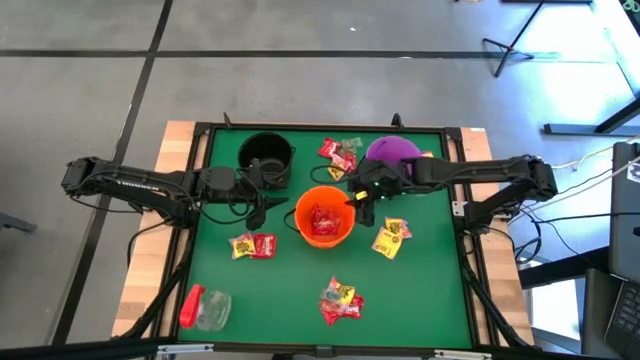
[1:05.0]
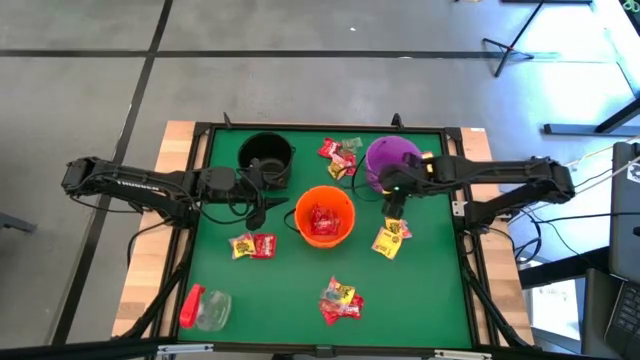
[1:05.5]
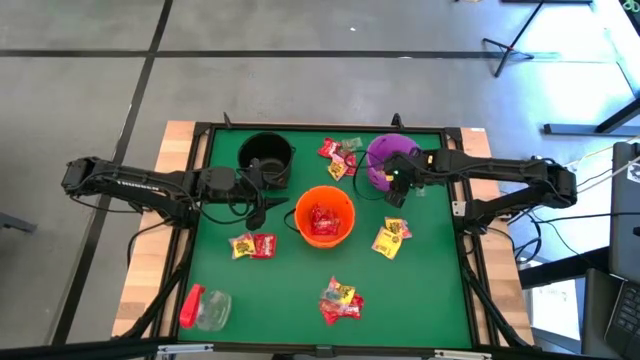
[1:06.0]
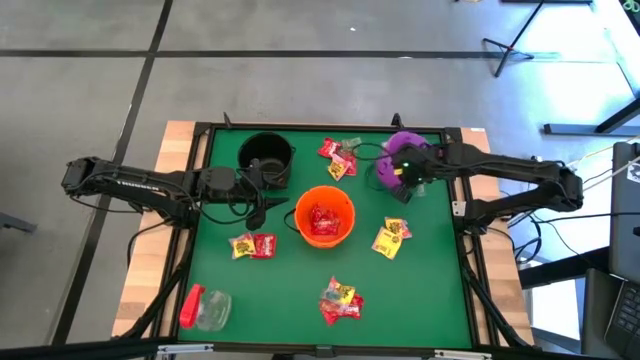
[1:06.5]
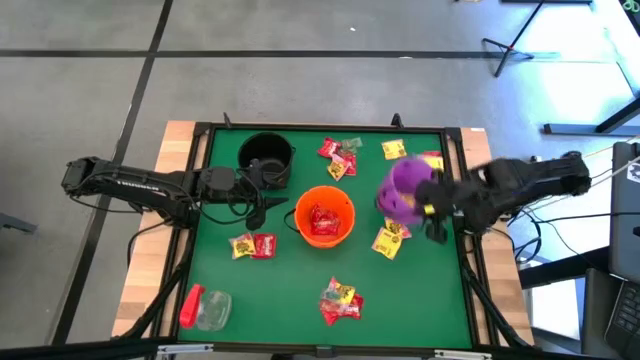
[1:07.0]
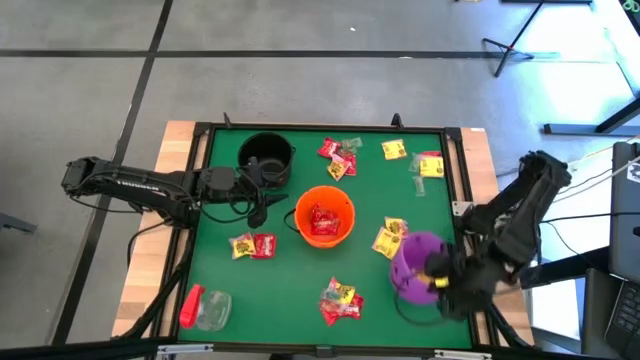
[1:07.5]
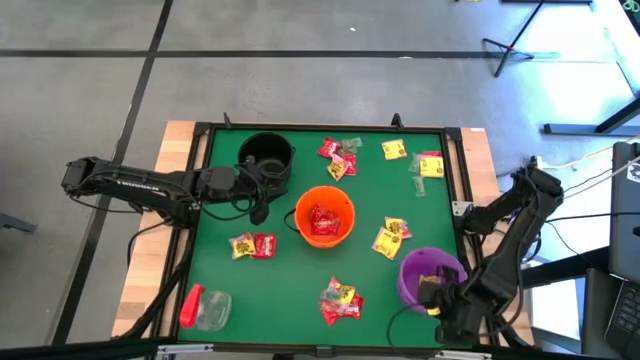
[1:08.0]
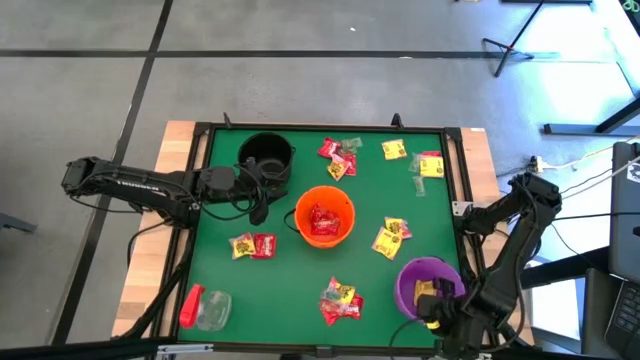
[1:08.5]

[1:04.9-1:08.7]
Task: Sort candy
Move the purple bin to the bottom right of the table

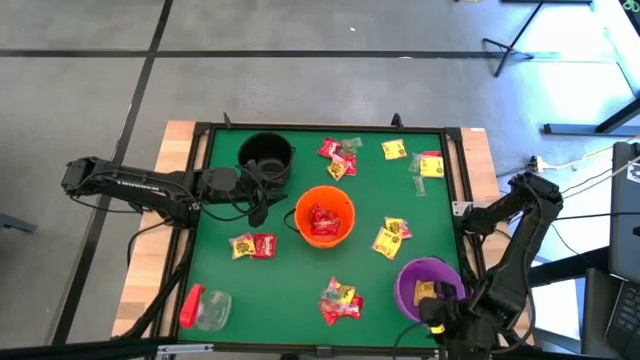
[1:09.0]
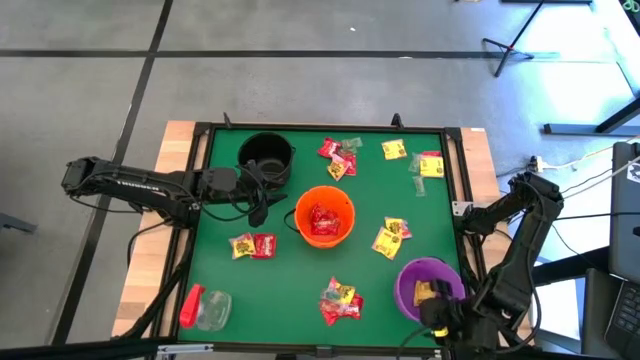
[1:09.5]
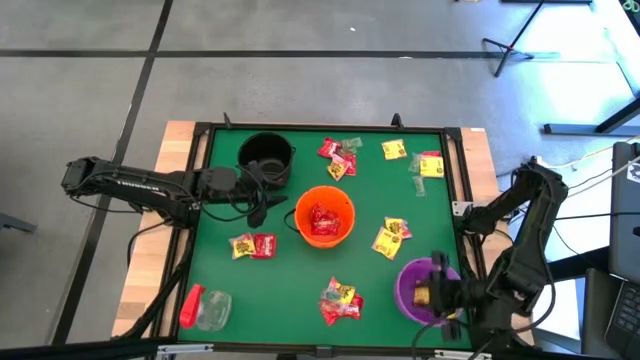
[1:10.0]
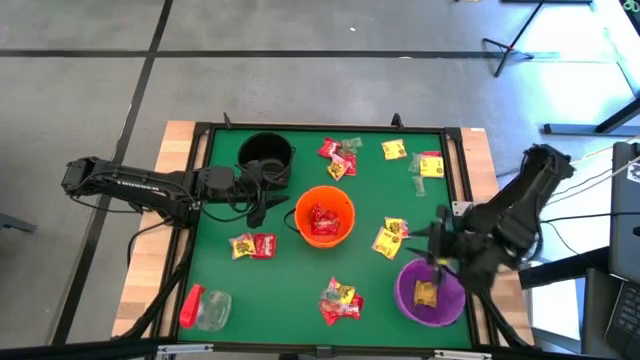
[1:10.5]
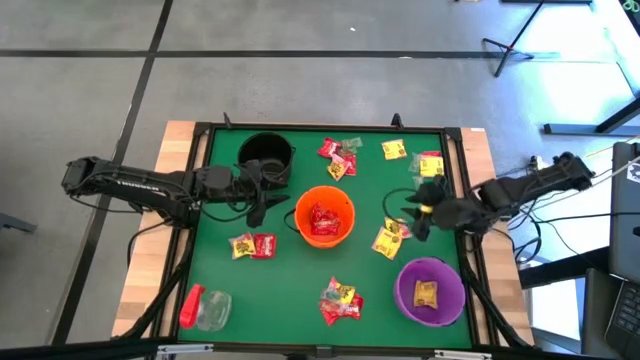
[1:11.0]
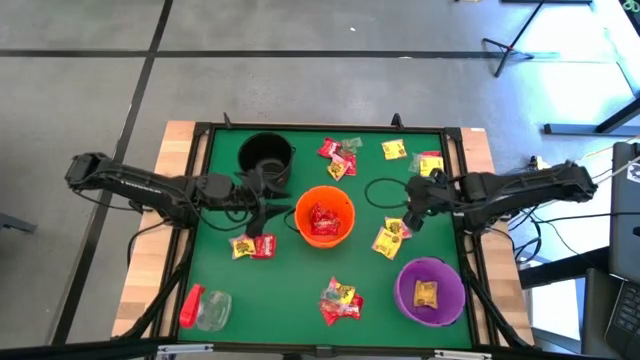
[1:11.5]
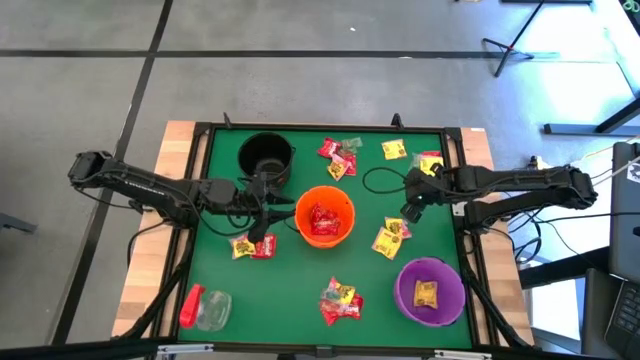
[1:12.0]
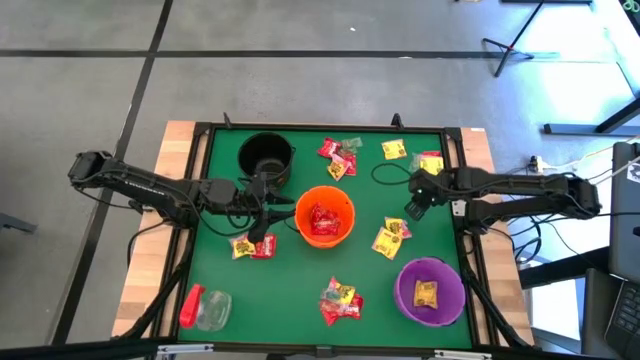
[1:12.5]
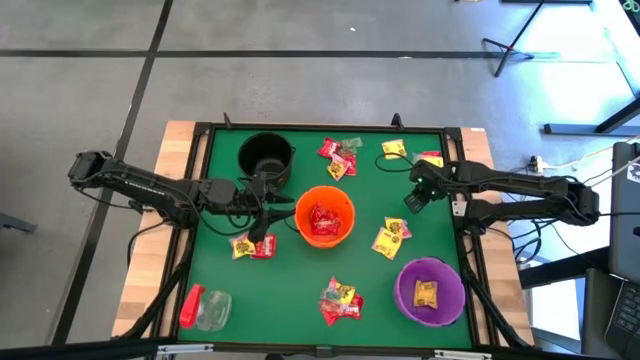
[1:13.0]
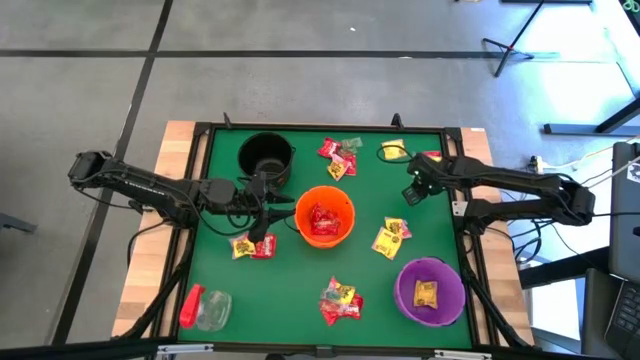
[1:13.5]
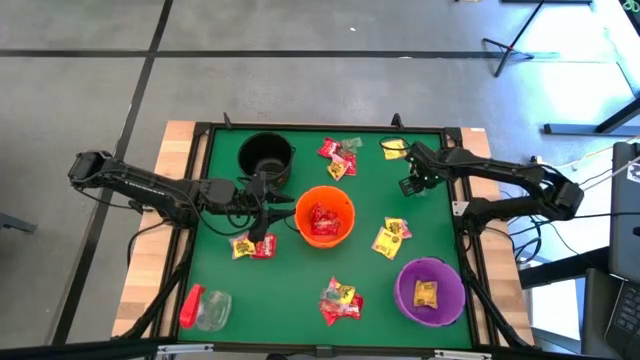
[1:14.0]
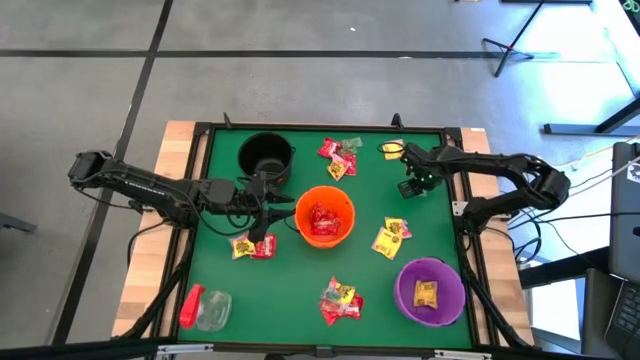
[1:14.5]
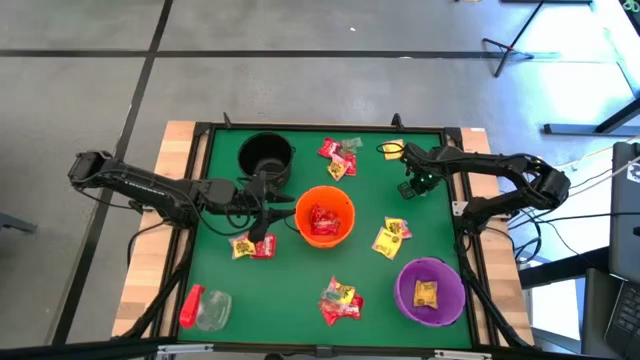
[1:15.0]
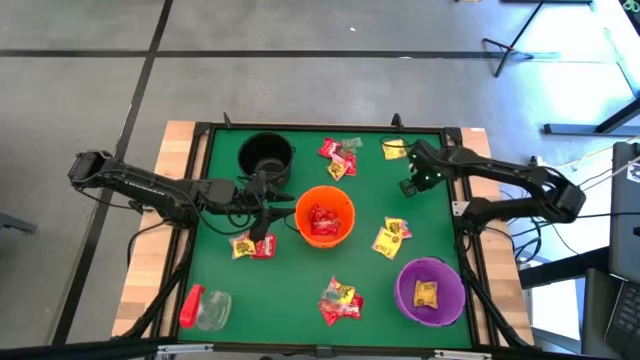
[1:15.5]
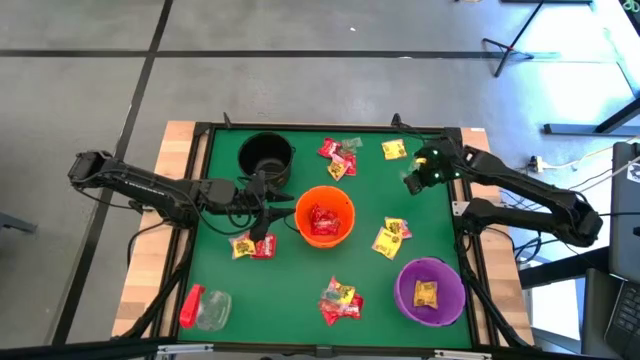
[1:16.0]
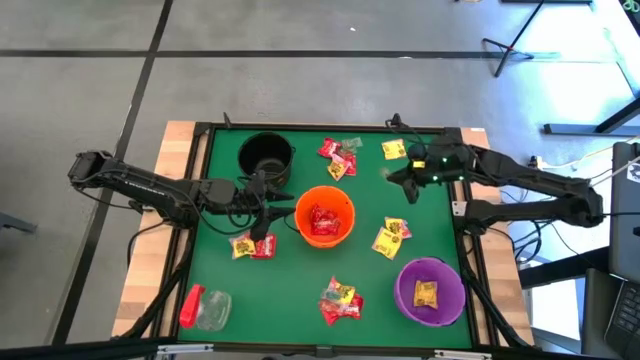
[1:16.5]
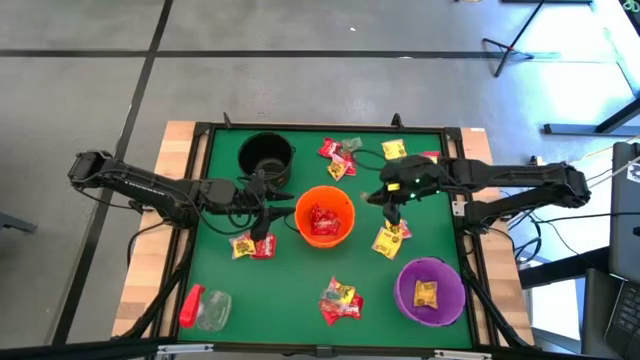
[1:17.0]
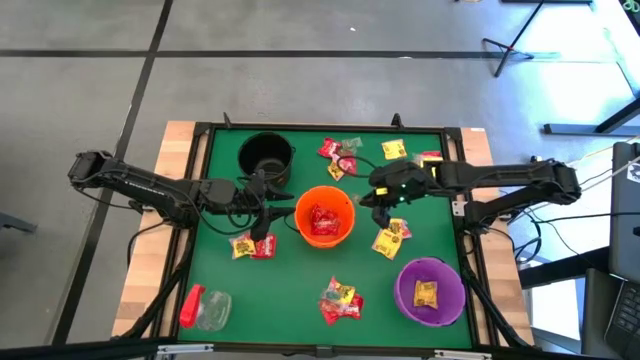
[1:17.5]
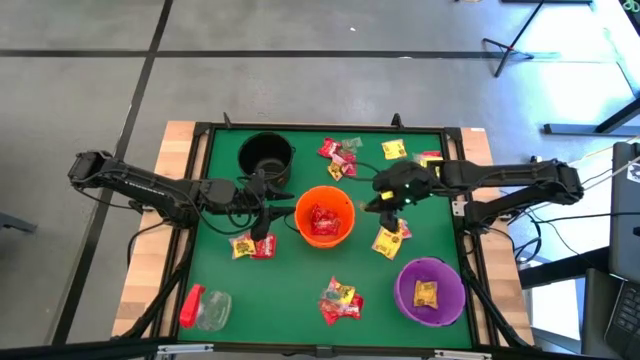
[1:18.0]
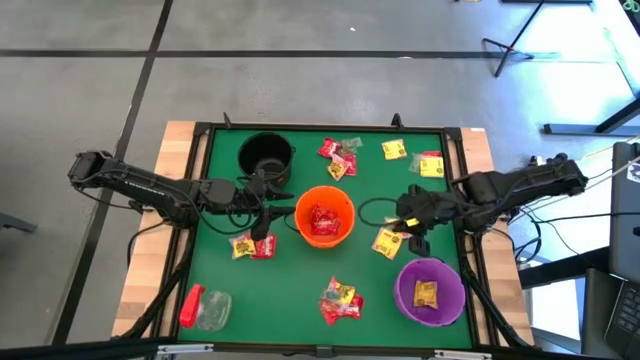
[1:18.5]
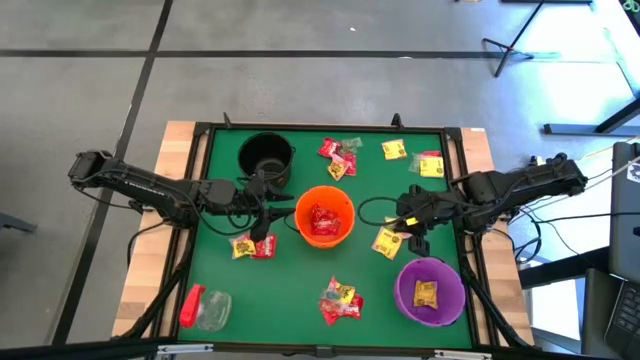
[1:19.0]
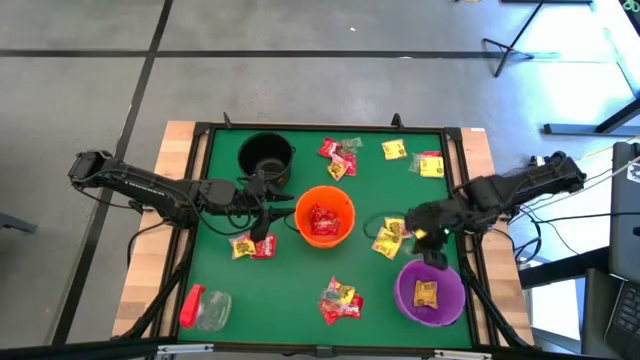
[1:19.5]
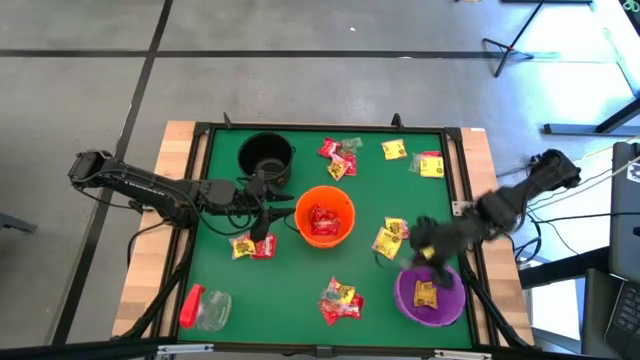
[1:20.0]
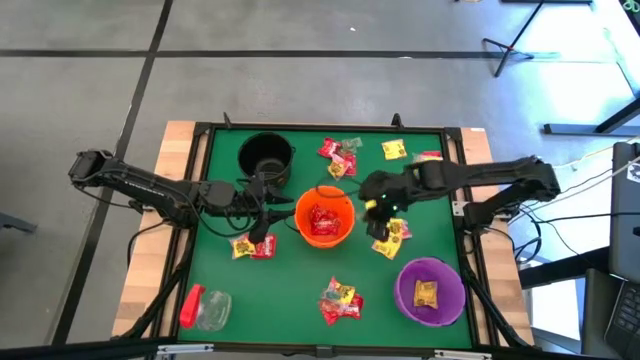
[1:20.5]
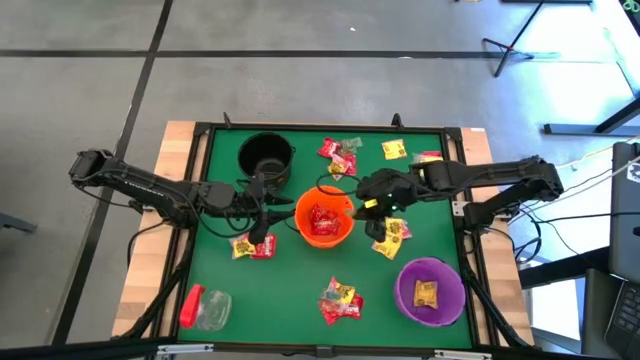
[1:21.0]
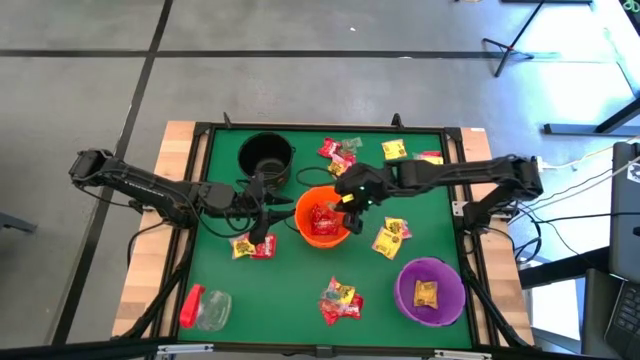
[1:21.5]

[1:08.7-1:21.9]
Put the green candy into the orange bin

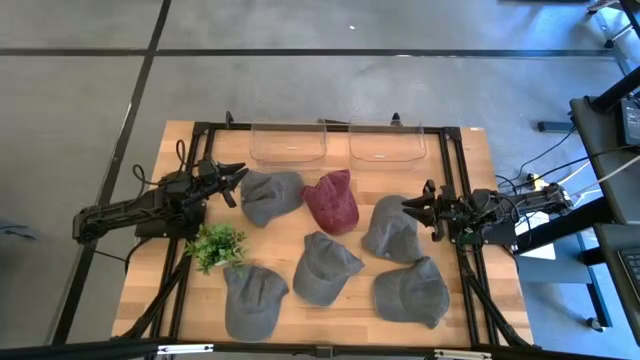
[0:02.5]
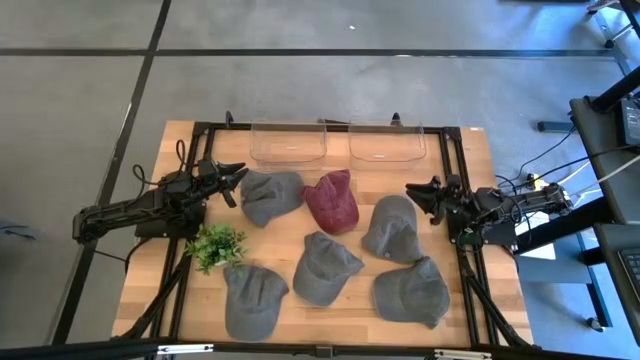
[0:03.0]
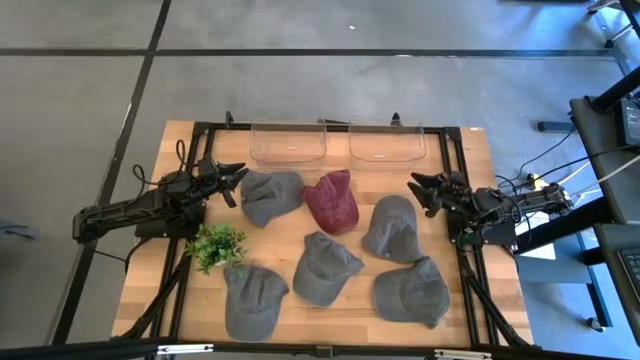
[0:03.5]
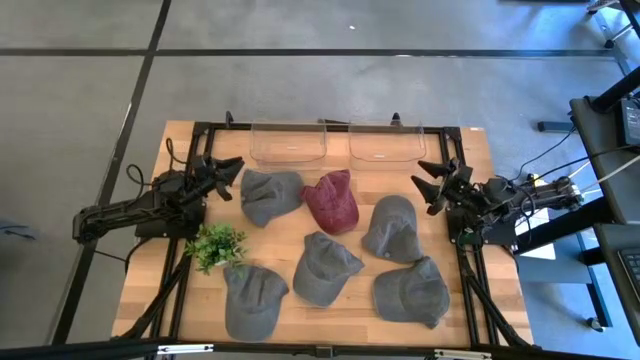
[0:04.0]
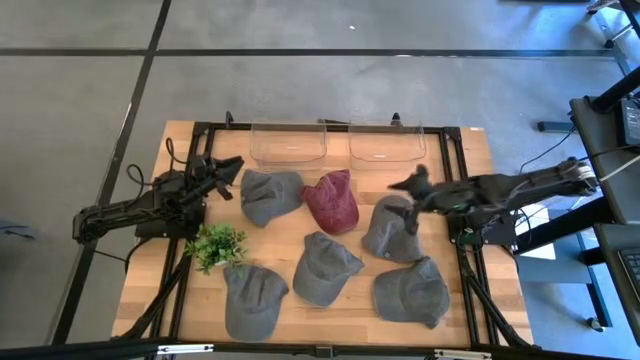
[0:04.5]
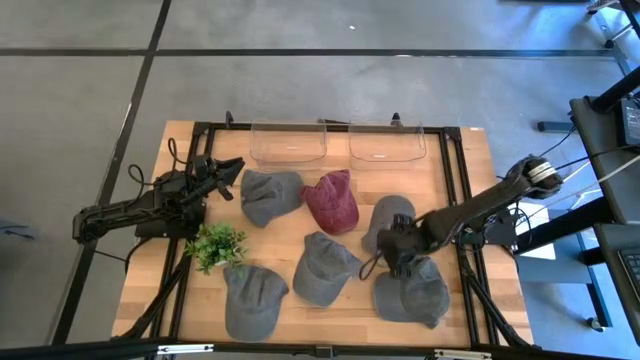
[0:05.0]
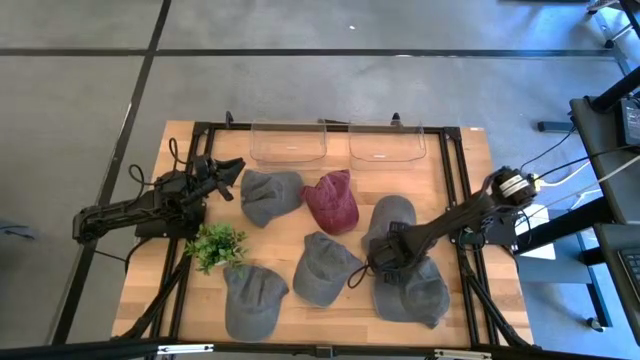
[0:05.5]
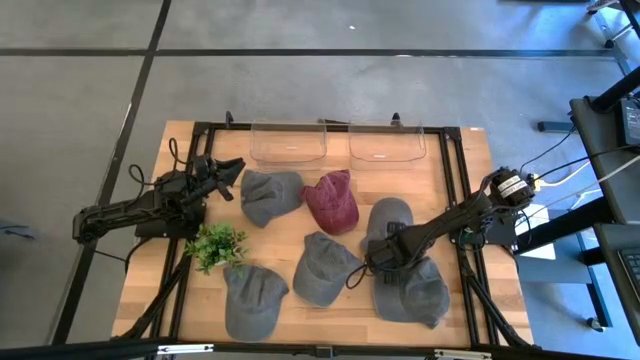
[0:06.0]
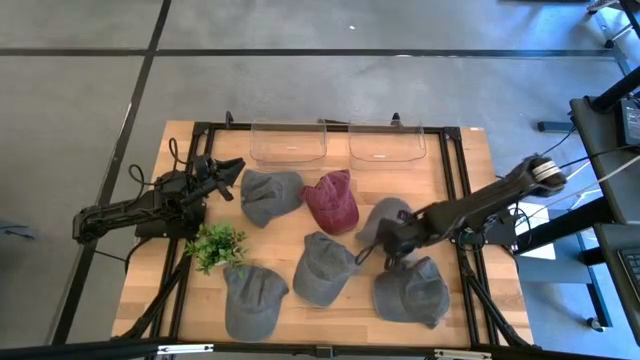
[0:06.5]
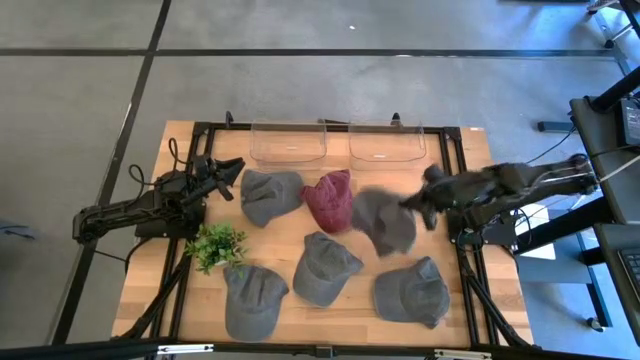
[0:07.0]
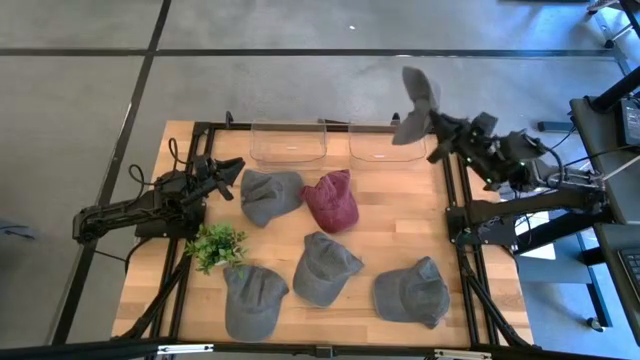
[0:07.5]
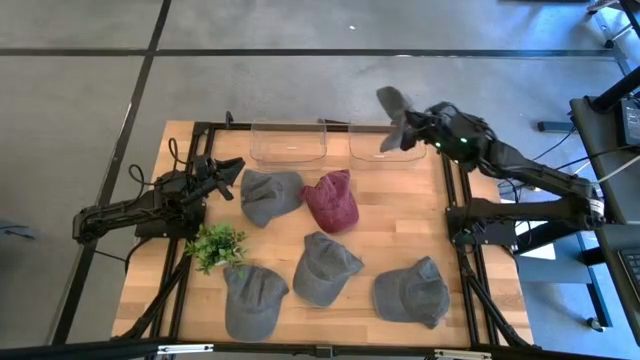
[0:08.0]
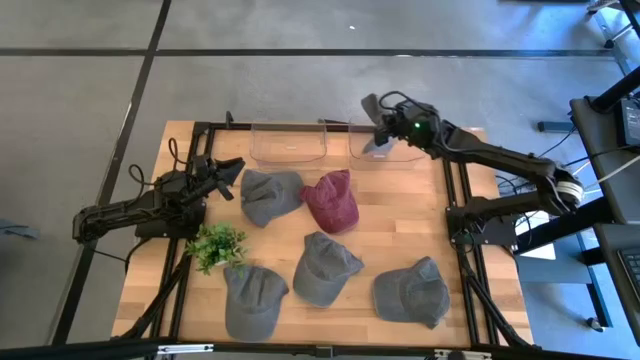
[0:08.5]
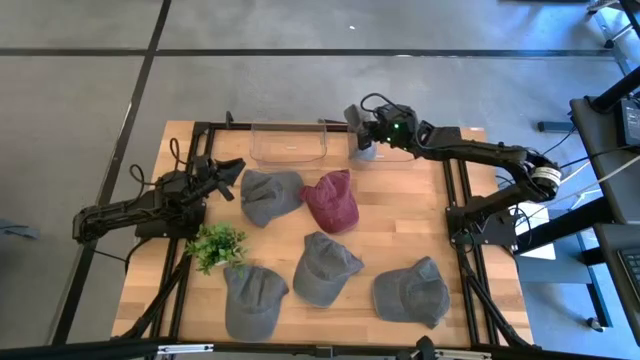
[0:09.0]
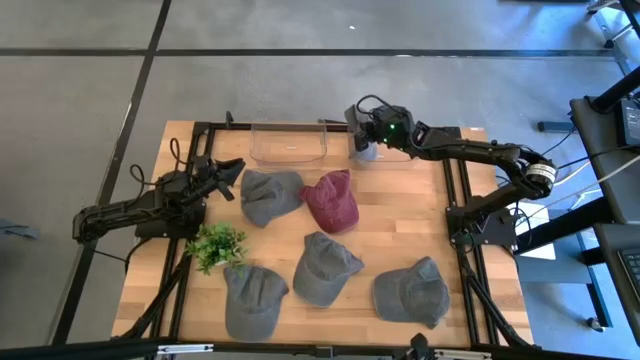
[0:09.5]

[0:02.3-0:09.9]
Task: Pick & Place hat
Put the gray cap into the right transparent bin
